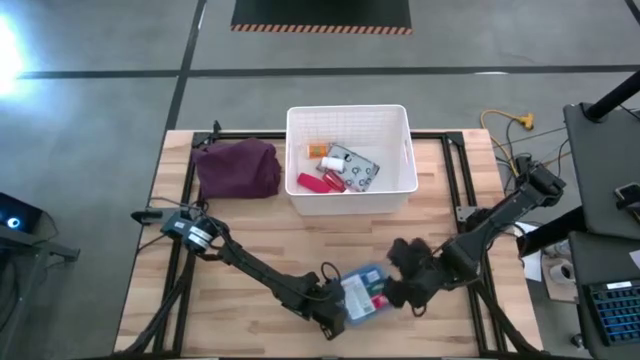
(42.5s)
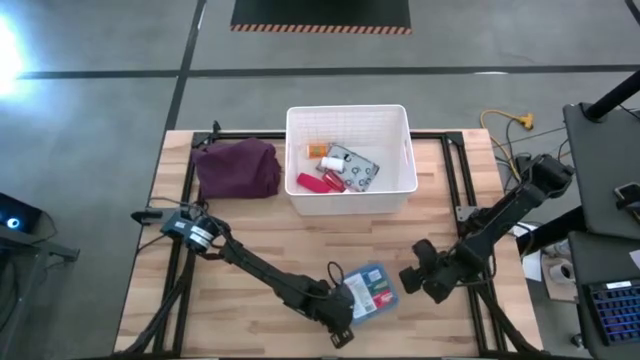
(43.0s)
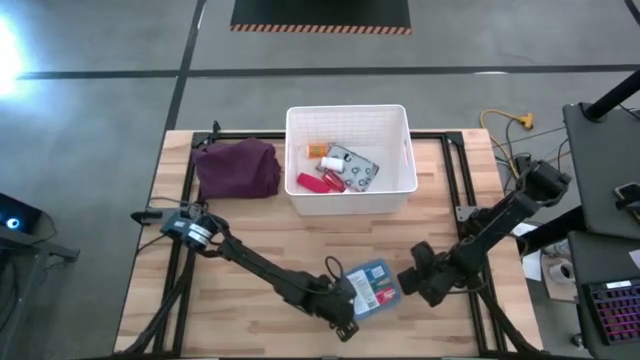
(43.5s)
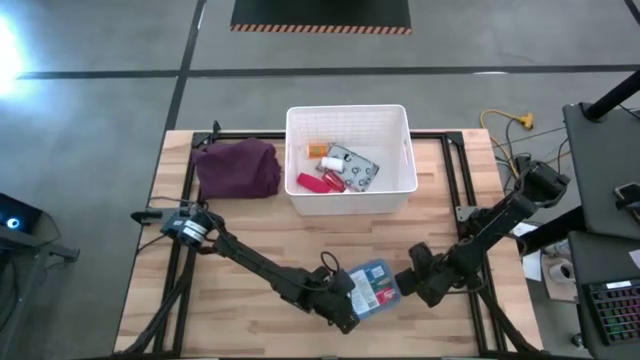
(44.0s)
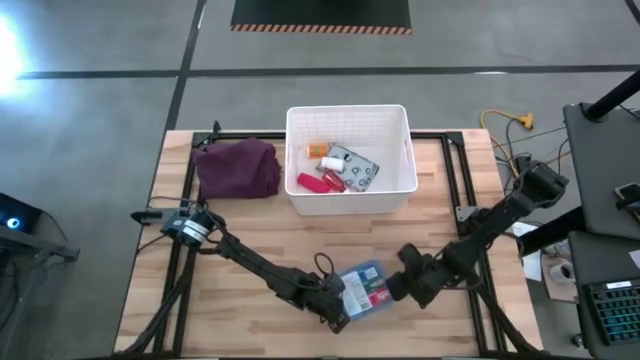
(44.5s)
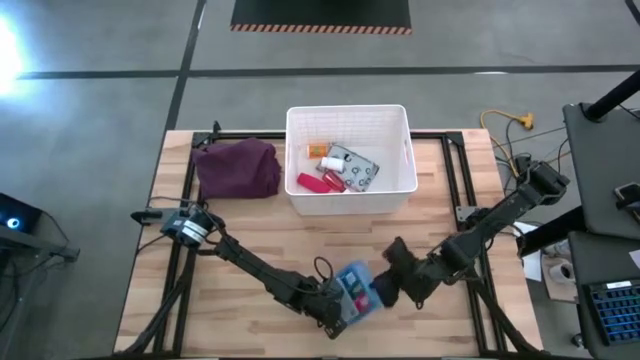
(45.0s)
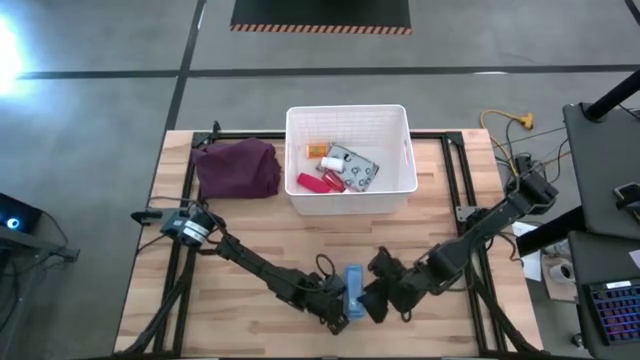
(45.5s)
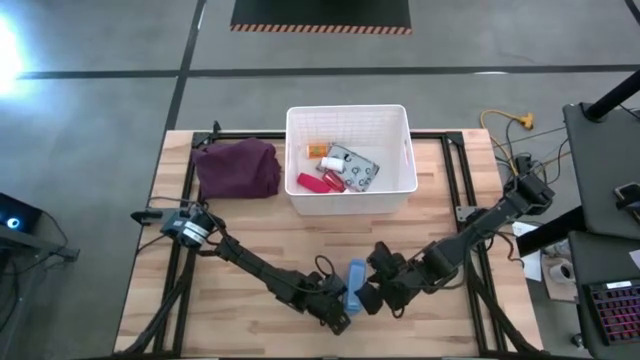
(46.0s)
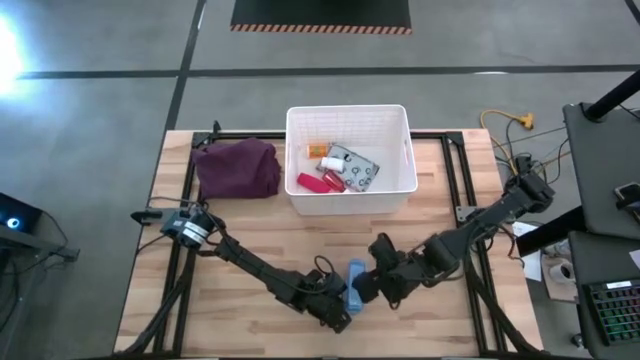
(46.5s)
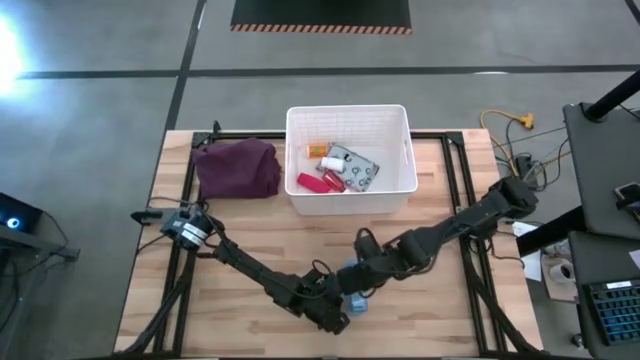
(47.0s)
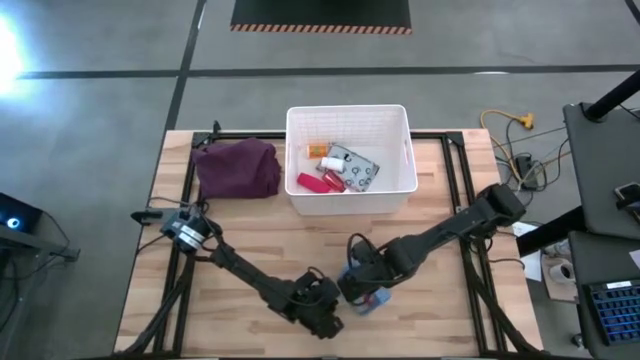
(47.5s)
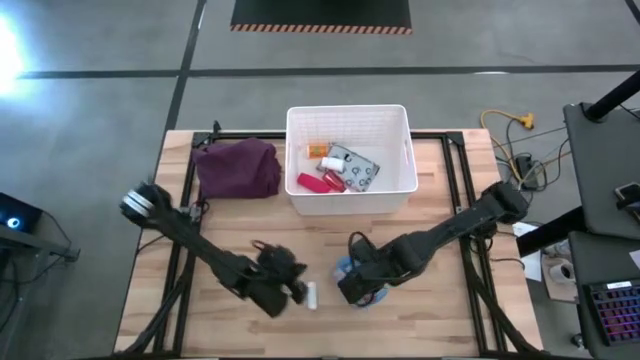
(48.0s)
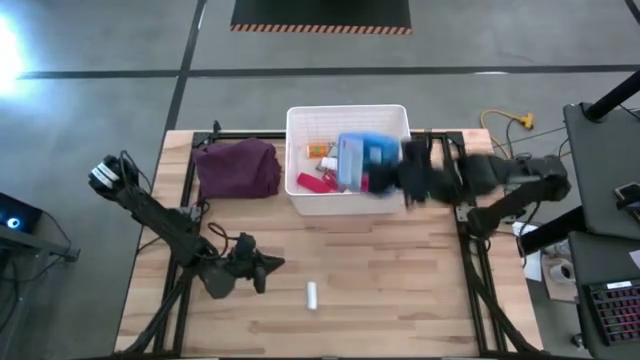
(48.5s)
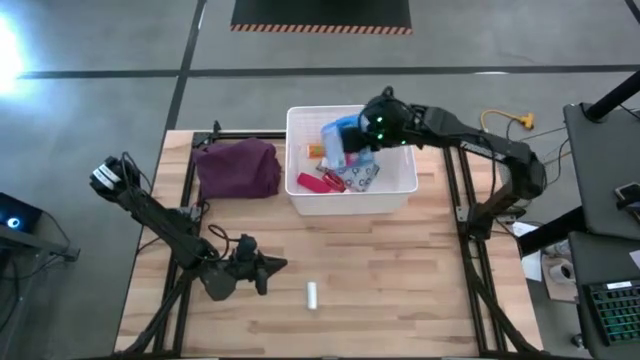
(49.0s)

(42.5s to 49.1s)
Task: Pick & place medical supplies in basket/bin
Put the blue first aid kit into the white bin

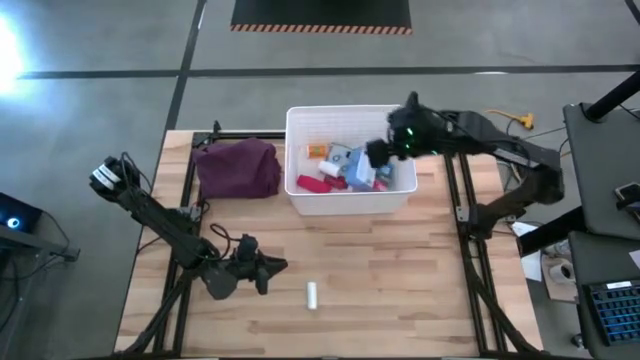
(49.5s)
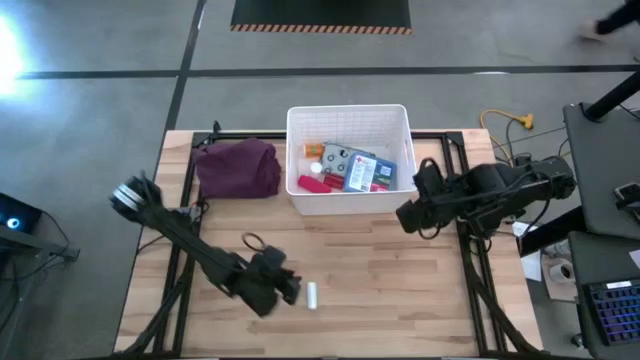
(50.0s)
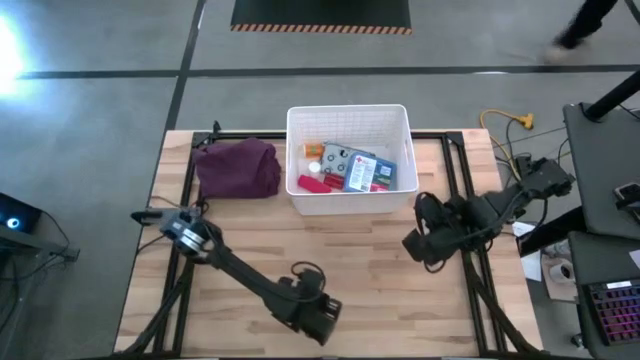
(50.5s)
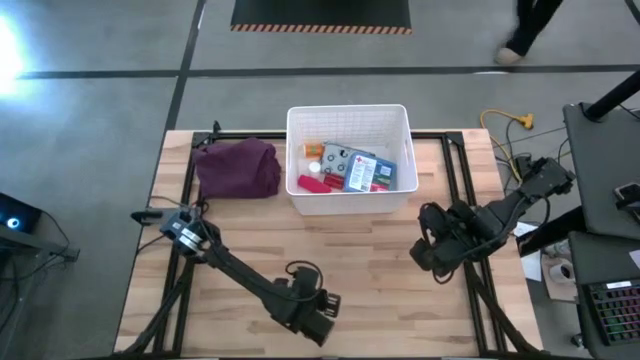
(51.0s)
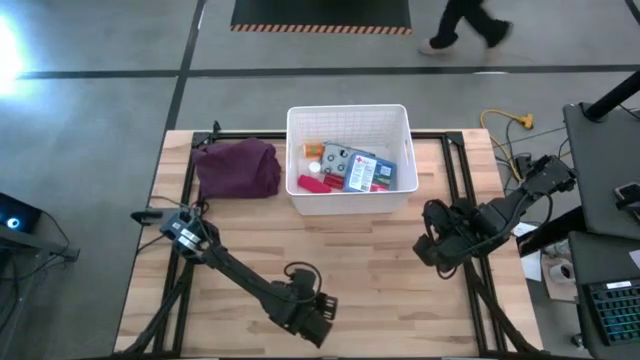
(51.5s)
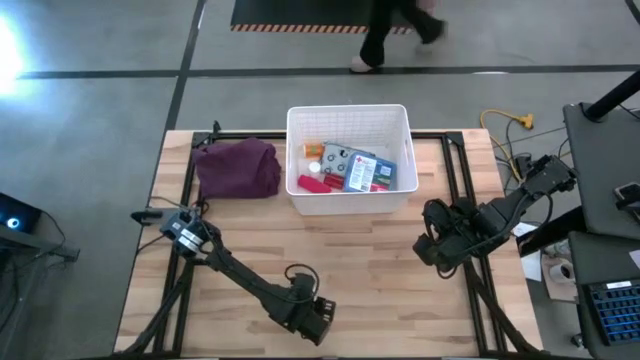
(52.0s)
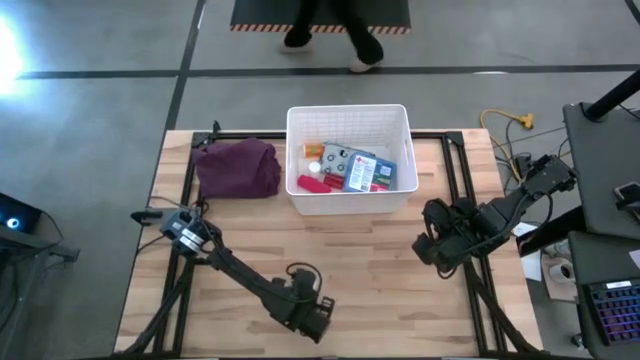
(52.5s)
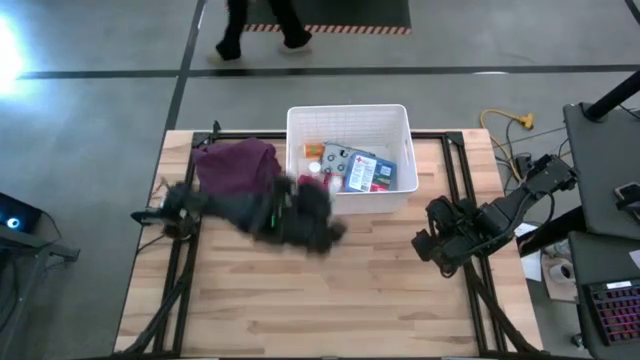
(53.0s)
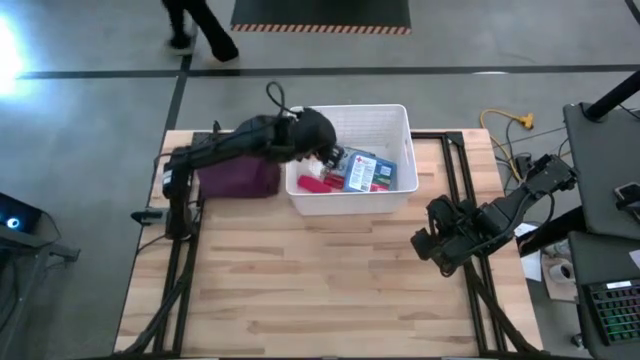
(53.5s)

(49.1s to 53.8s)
Put the white bandage into the white bin

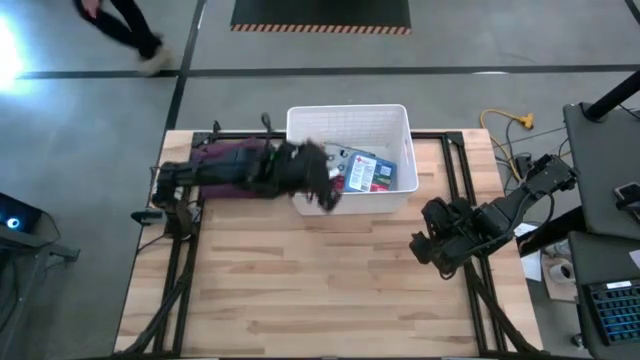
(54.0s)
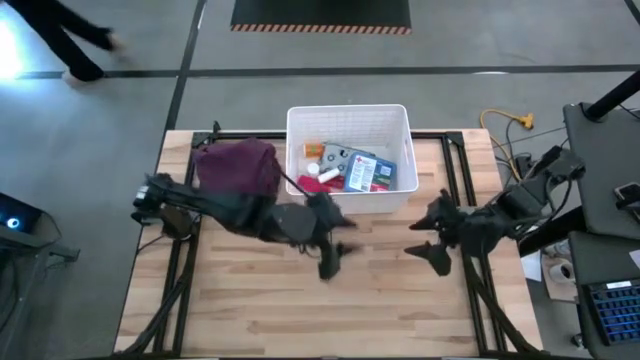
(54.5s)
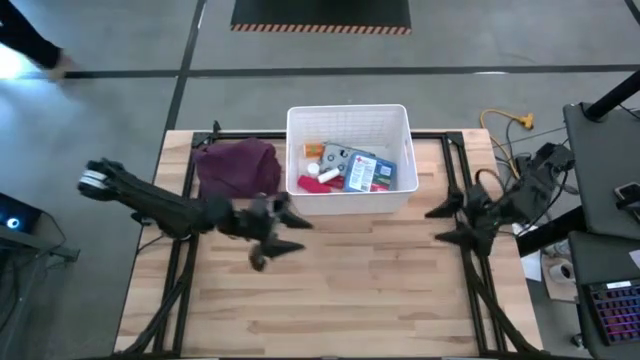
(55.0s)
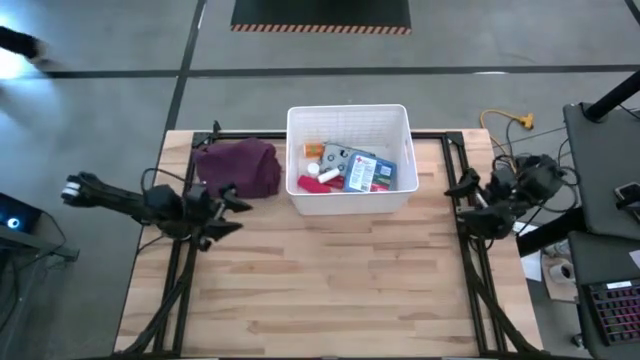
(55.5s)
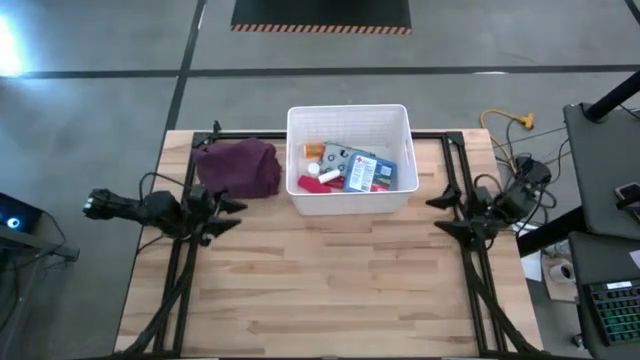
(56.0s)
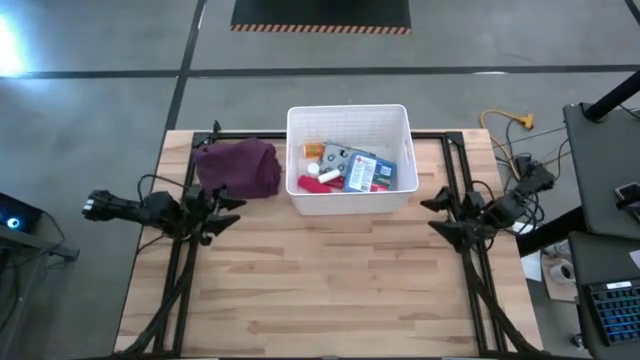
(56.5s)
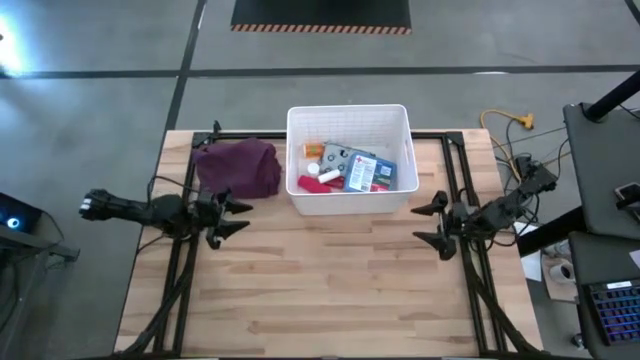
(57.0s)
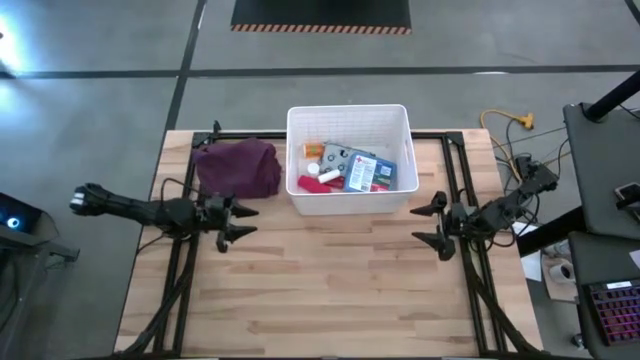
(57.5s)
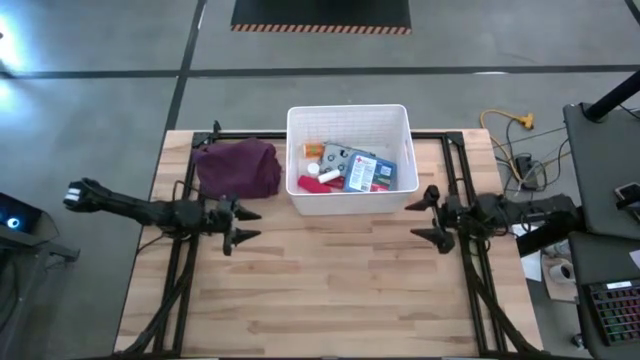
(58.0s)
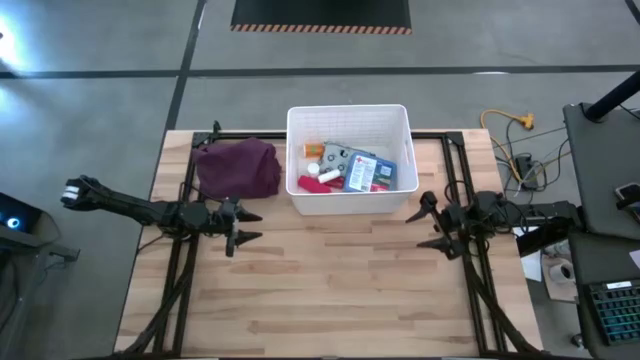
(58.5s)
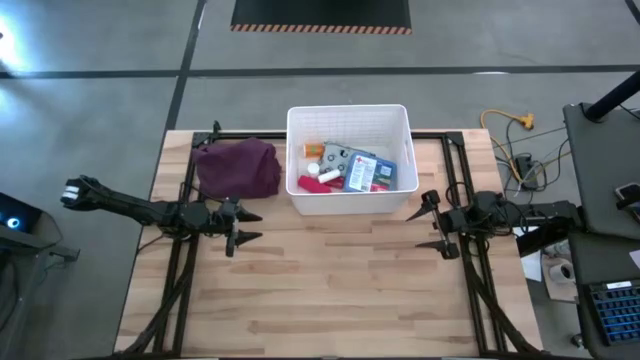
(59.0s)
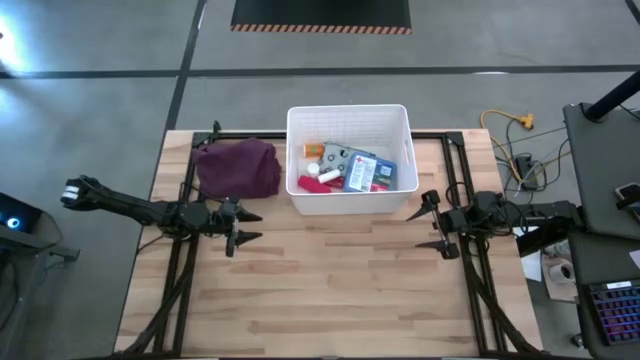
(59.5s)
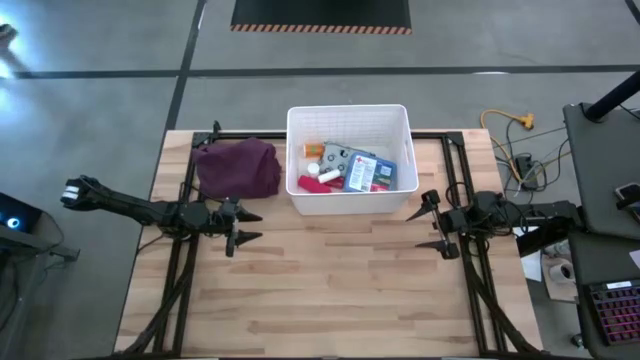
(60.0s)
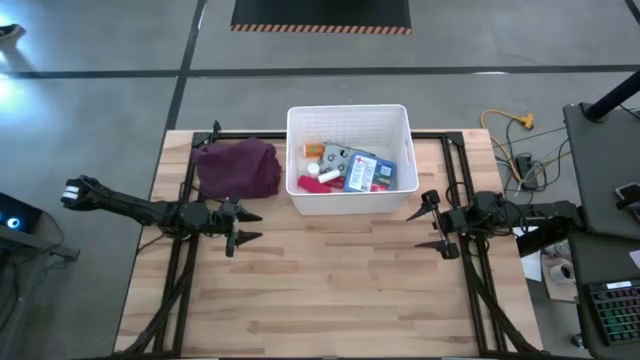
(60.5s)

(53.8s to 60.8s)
Return to Home Position

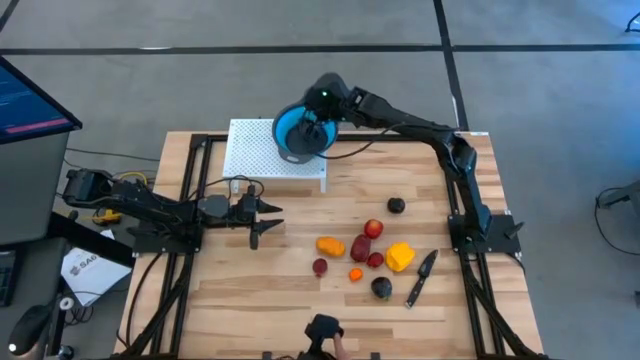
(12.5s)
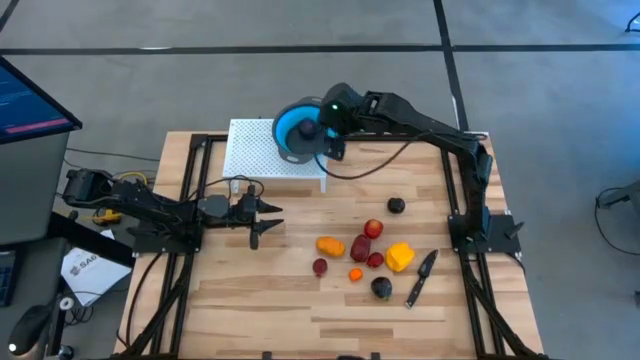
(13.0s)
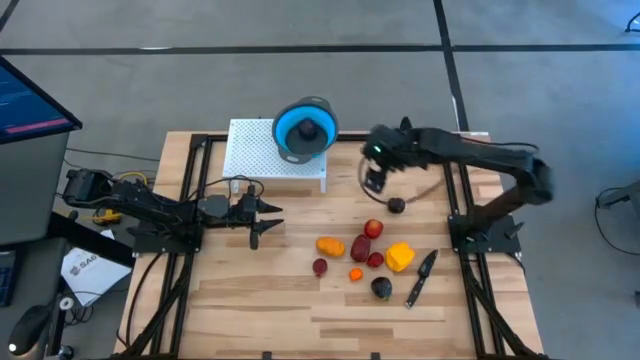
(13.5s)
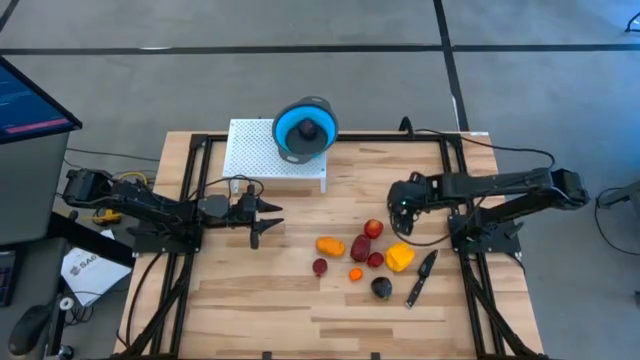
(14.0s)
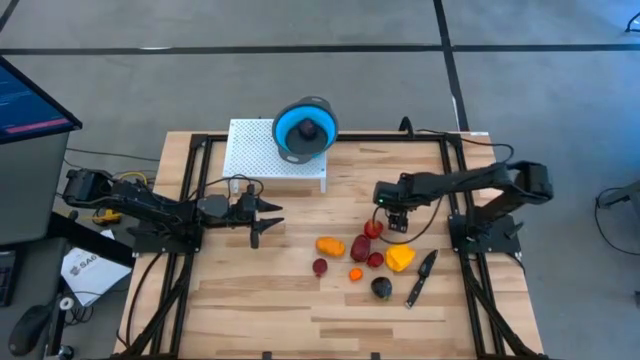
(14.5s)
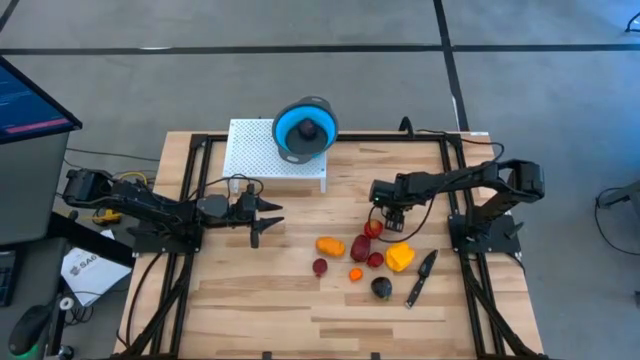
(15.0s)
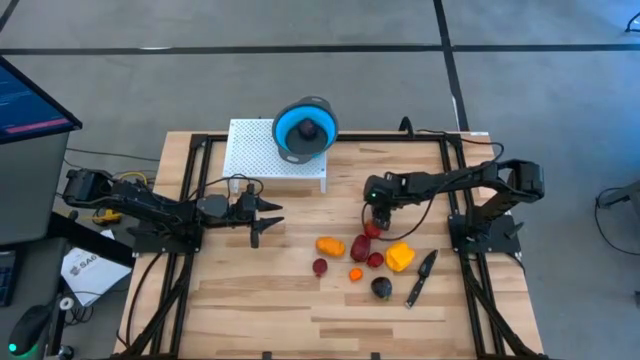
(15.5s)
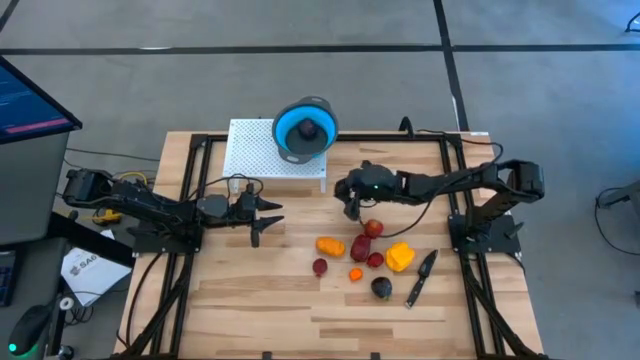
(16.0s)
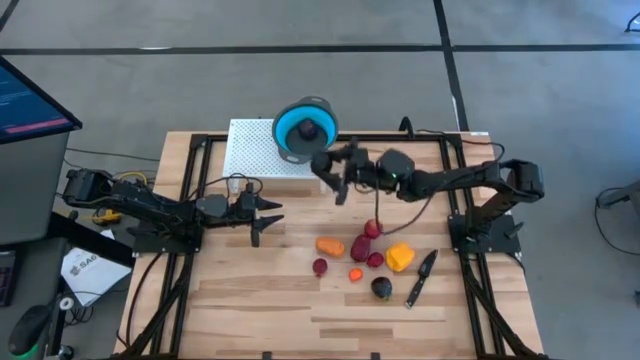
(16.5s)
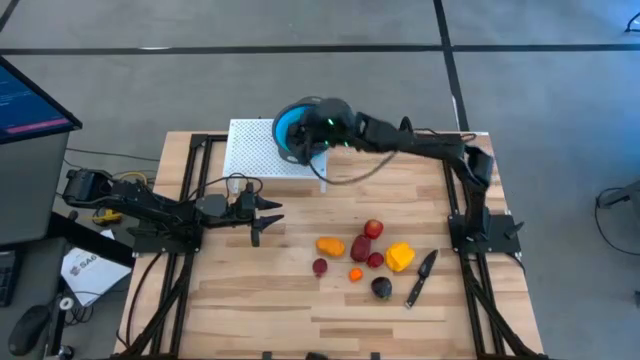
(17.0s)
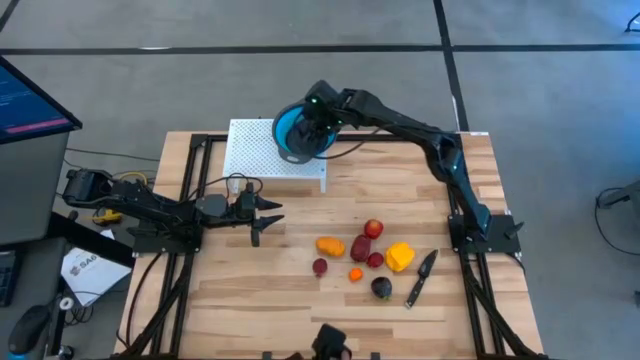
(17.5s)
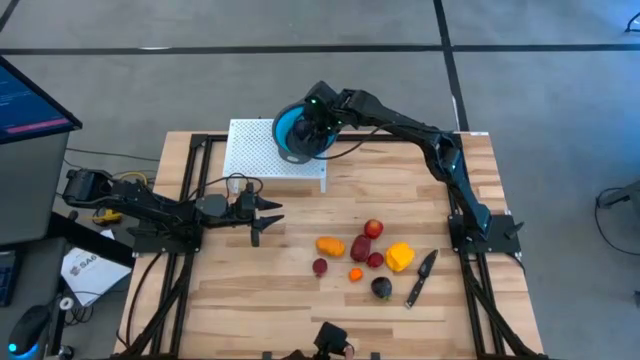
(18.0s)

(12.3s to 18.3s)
Task: Pick & Place Fruit
Put the black plum into the blue strainer bowl
